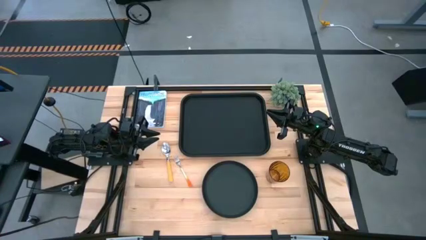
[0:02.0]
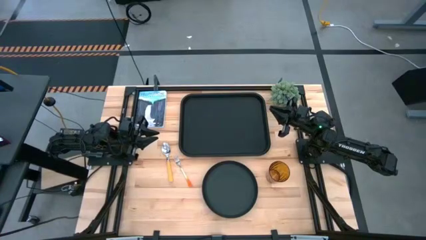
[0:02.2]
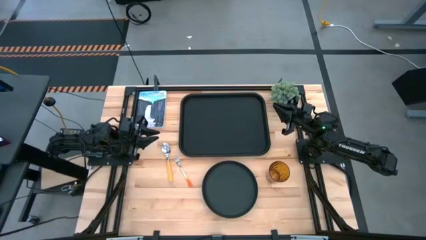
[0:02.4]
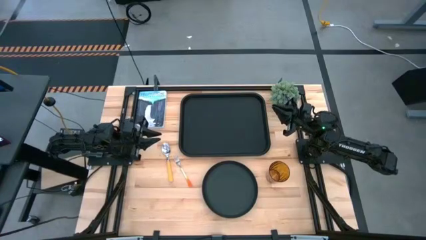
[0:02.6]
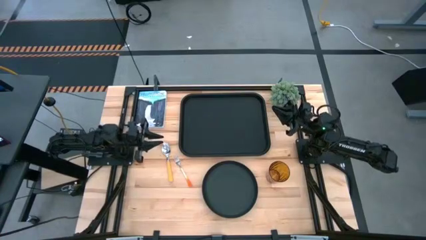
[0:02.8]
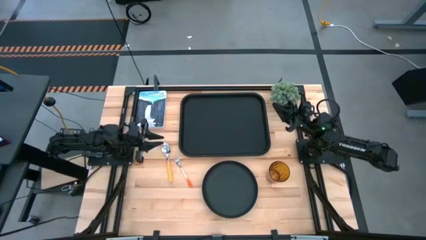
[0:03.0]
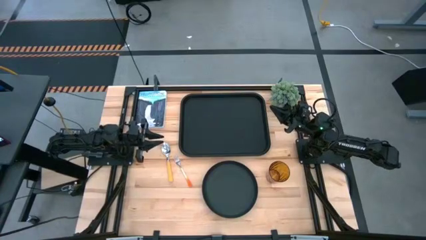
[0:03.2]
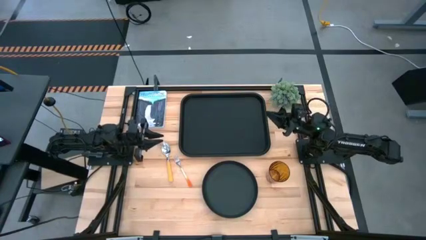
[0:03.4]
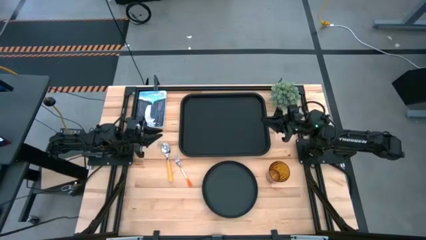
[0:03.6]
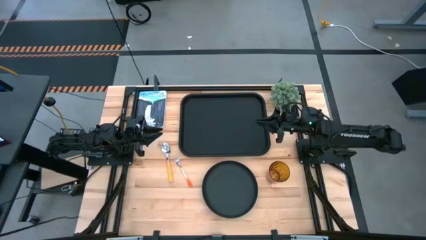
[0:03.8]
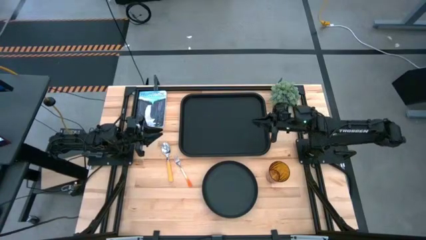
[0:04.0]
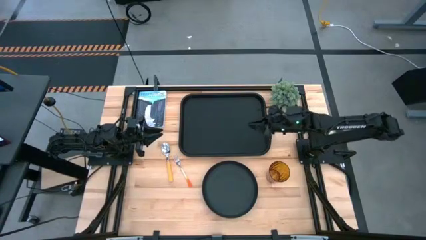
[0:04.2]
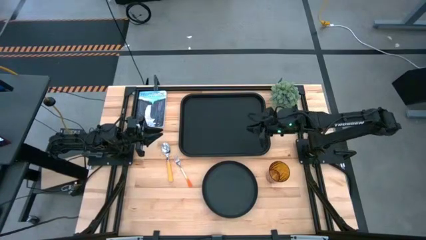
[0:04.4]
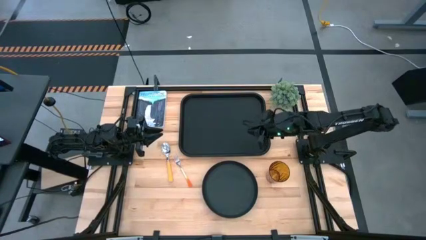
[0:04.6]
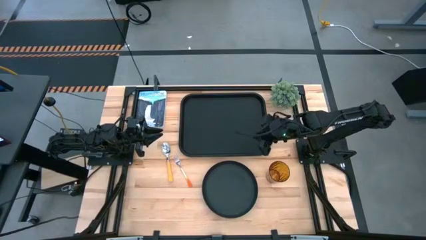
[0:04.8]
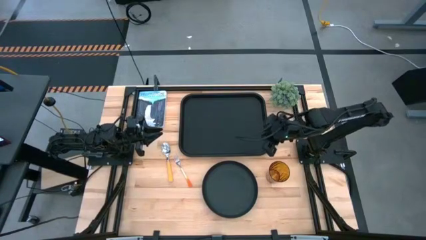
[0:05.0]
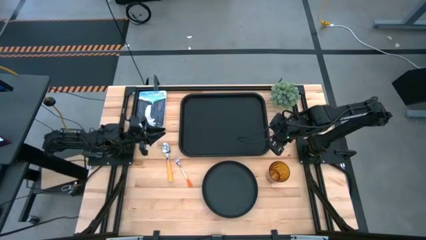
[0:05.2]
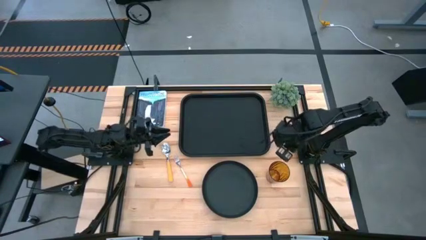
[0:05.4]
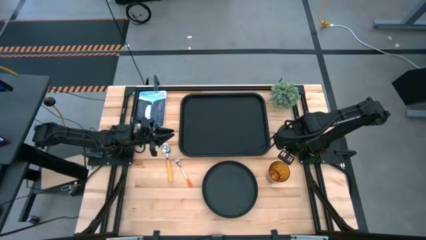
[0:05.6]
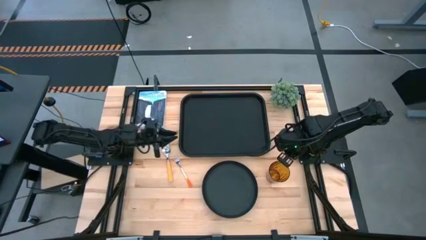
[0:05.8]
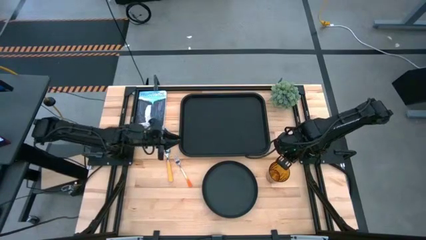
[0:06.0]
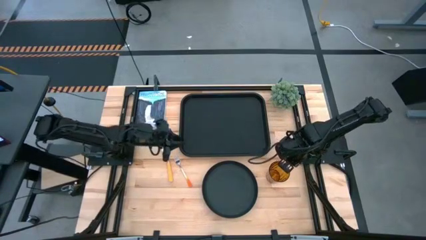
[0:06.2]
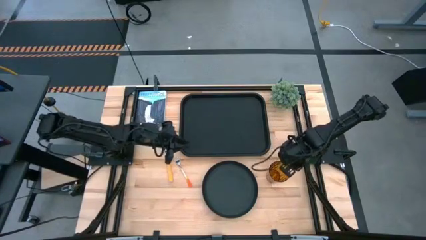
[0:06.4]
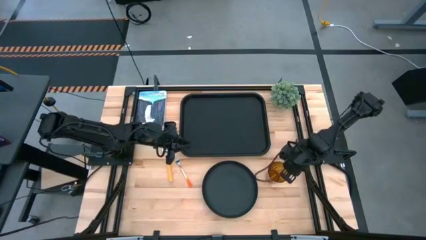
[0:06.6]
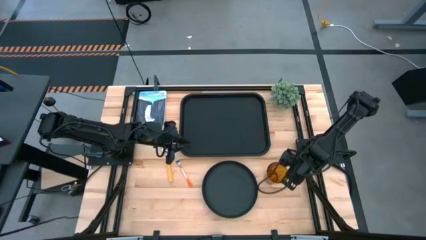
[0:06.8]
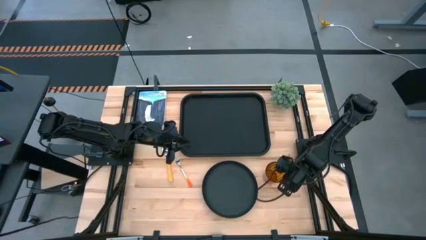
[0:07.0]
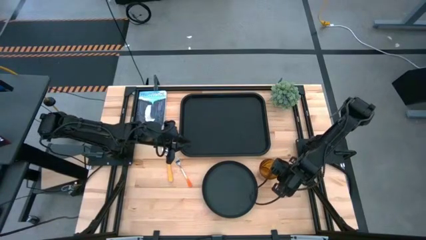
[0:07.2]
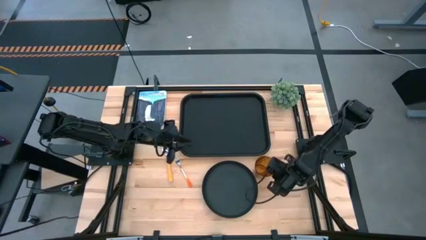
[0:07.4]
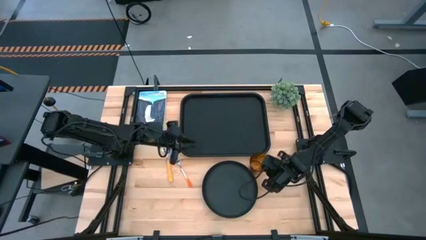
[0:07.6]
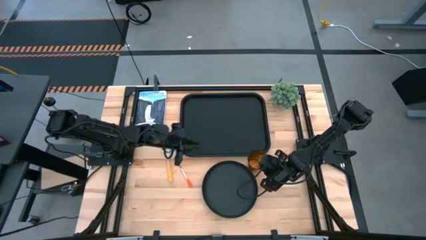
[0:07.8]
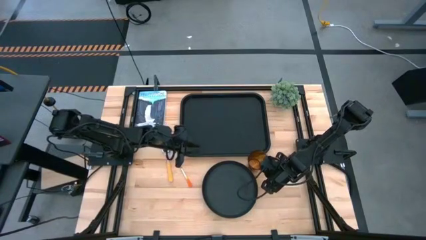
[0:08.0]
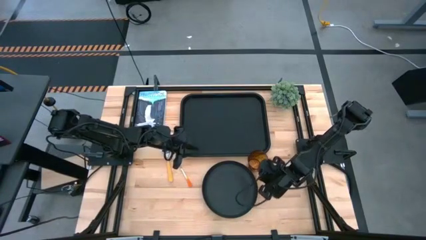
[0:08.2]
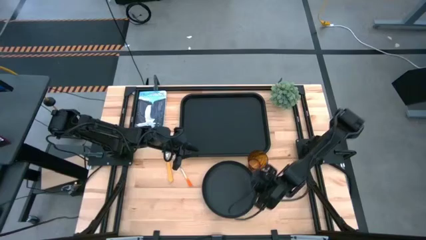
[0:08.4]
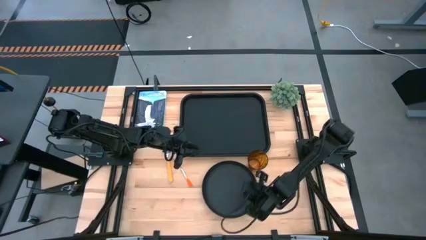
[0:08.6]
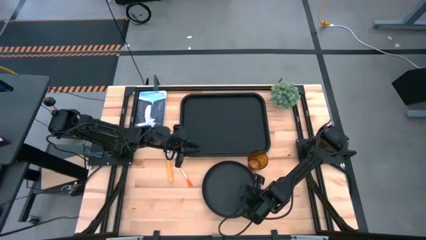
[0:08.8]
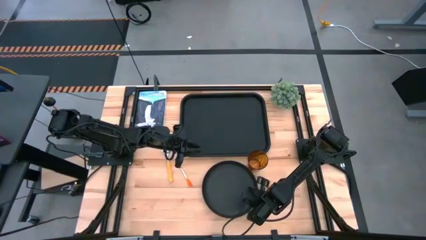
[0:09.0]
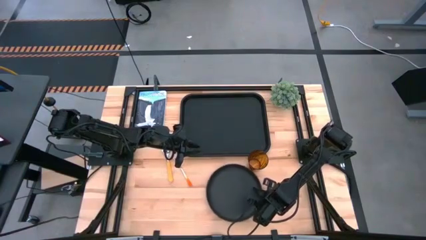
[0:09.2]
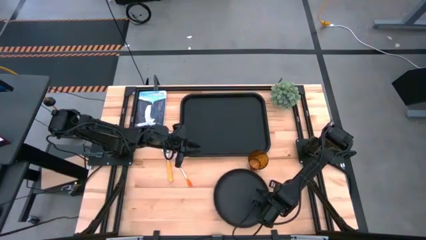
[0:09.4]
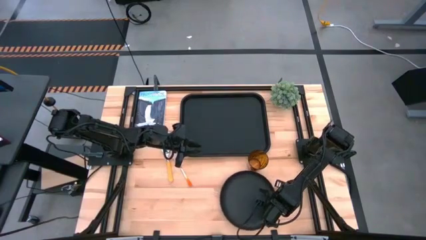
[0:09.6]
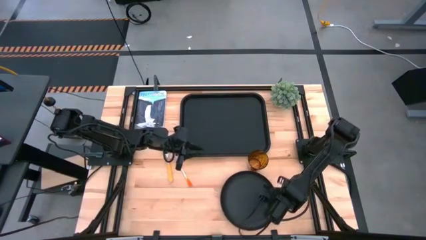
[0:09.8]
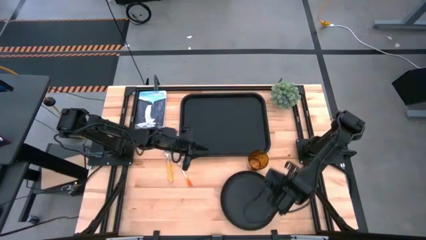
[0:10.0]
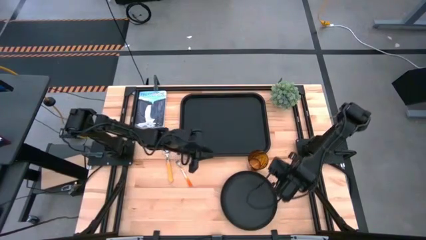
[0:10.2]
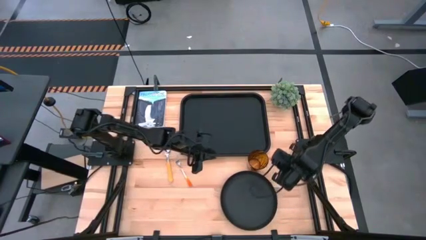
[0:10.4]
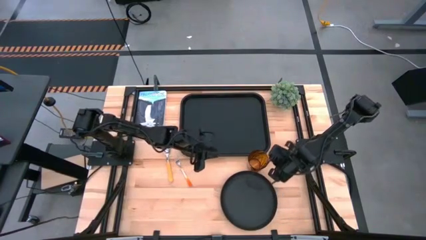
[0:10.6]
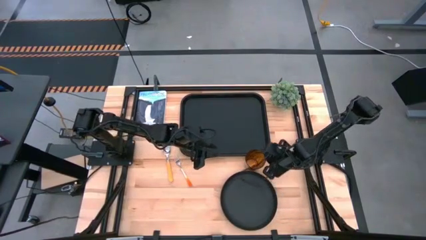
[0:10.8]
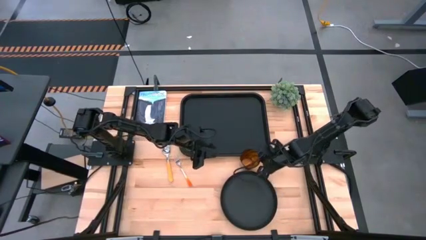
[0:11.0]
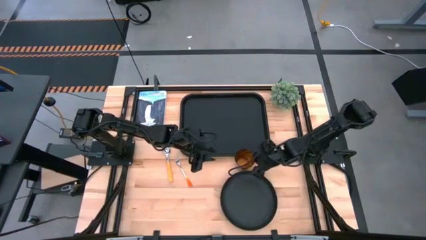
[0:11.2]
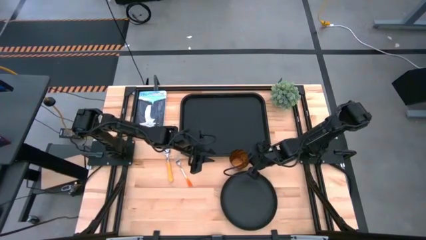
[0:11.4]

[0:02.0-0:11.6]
Task: Pick and place plate/cup/fork/spoon on tray
Prepare the black plate and yellow cup

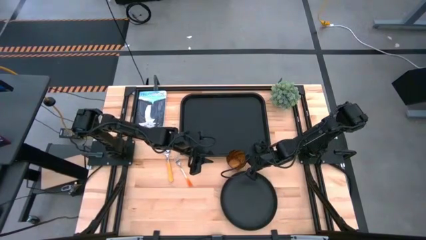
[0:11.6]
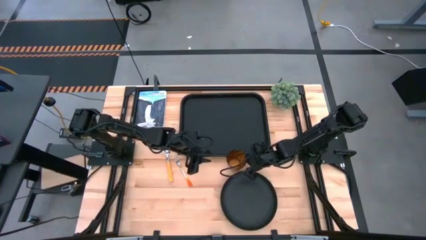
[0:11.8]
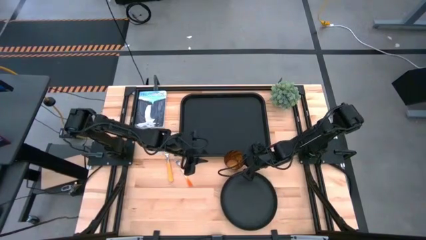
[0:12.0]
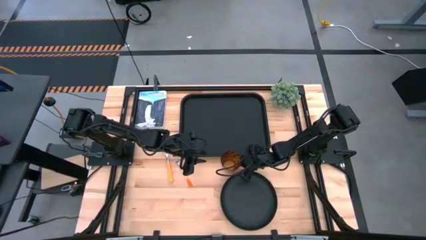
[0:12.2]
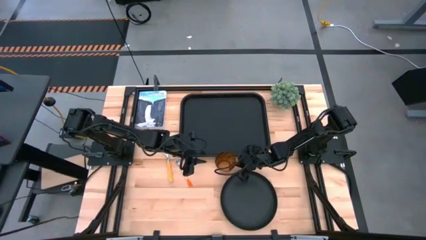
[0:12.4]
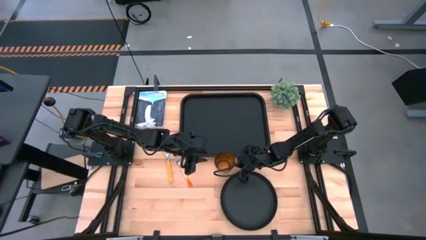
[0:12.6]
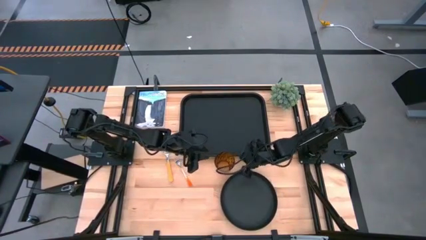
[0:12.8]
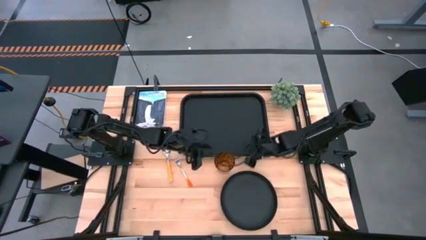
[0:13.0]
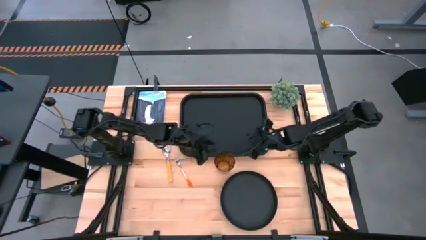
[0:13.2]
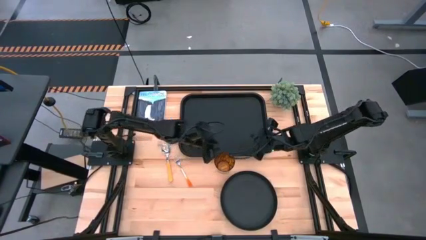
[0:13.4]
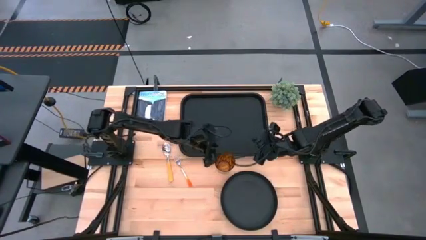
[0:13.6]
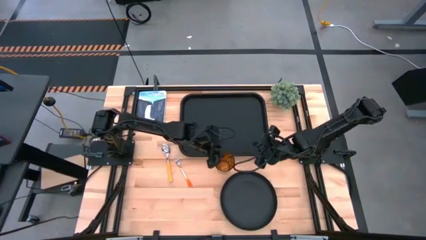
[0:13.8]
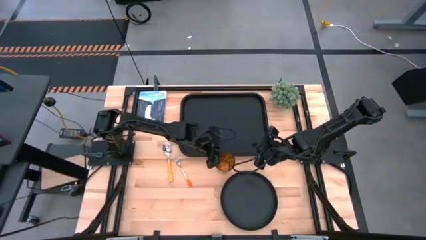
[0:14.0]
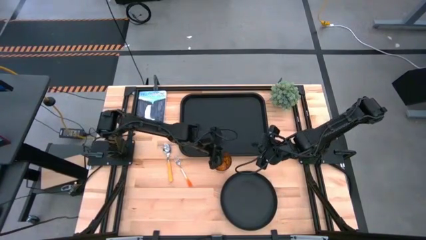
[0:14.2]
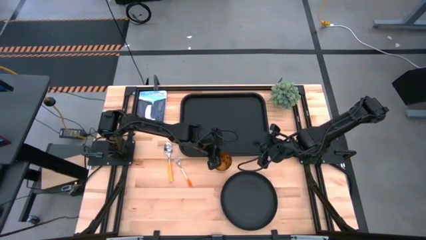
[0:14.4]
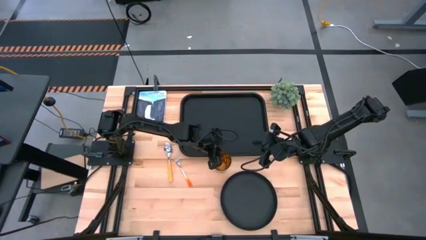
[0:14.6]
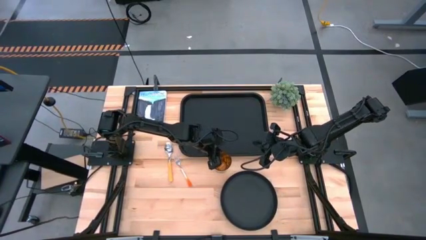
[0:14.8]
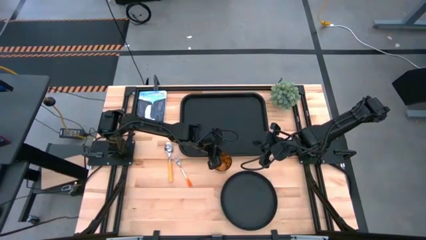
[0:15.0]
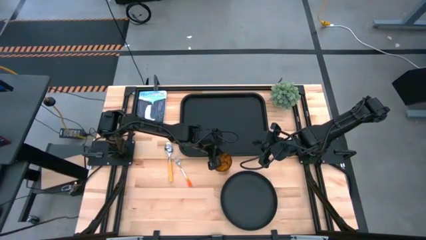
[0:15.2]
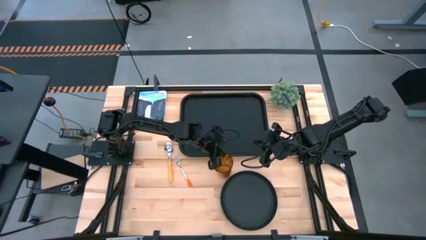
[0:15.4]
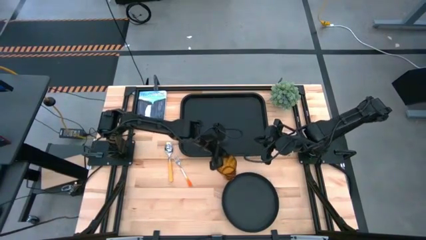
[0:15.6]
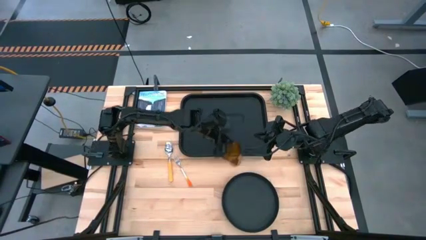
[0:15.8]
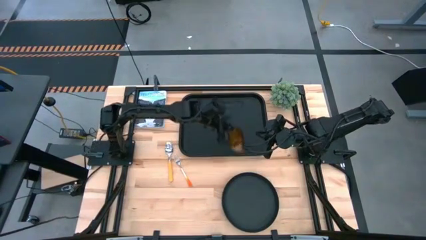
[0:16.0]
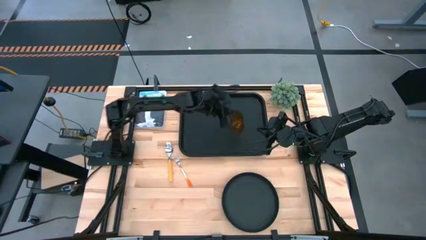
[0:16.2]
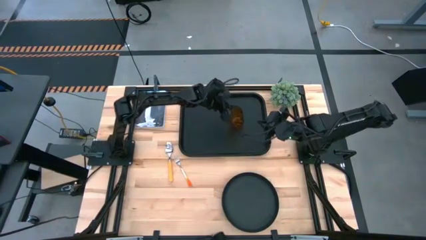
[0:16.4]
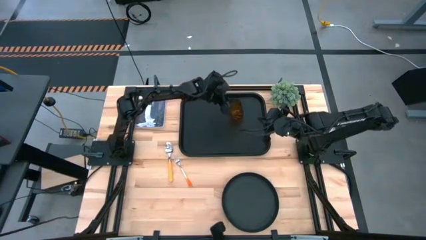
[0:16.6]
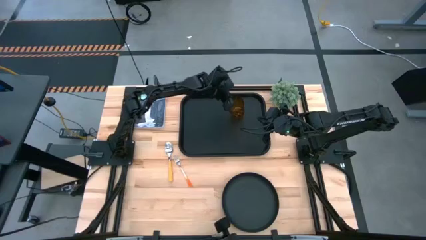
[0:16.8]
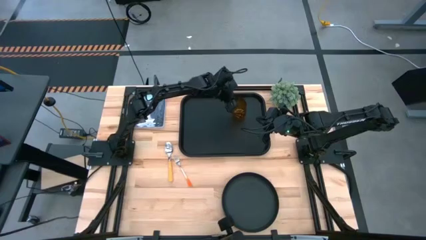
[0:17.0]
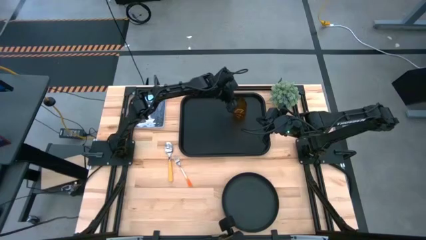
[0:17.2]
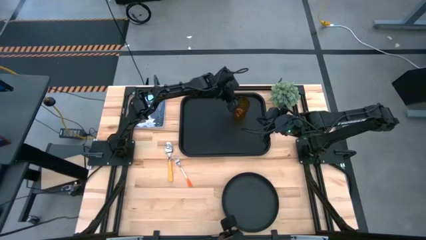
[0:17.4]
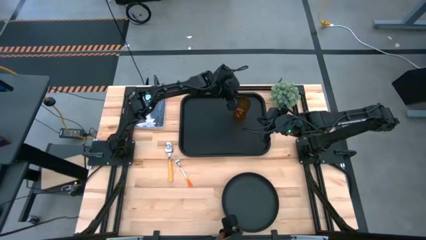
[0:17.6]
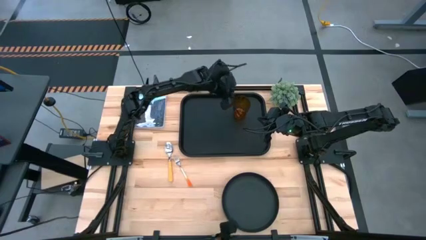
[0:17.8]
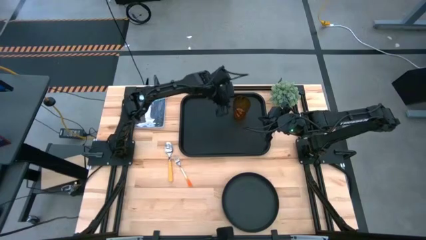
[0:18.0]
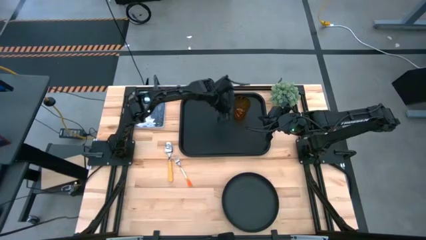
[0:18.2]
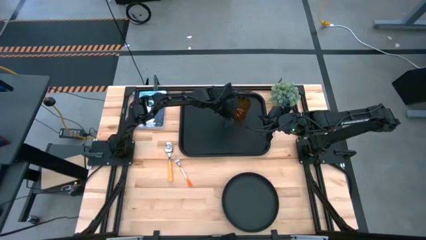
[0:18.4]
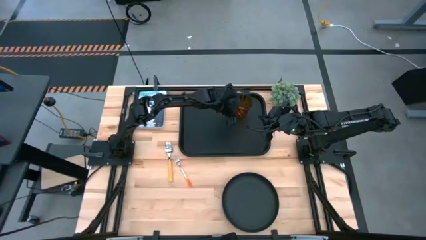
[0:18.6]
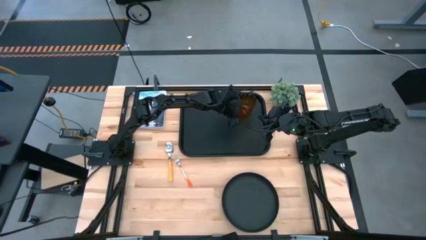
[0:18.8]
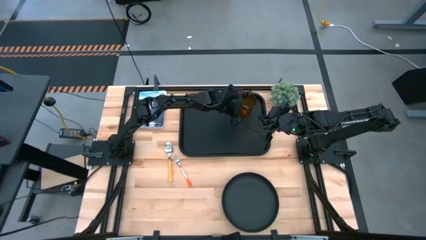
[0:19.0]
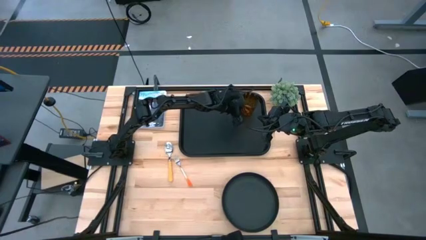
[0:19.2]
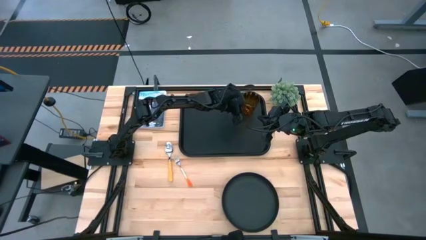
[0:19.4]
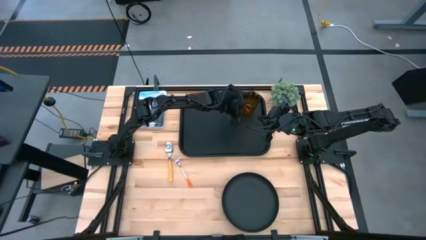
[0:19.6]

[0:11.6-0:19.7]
Put the yellow cup on the top right of the black tray
